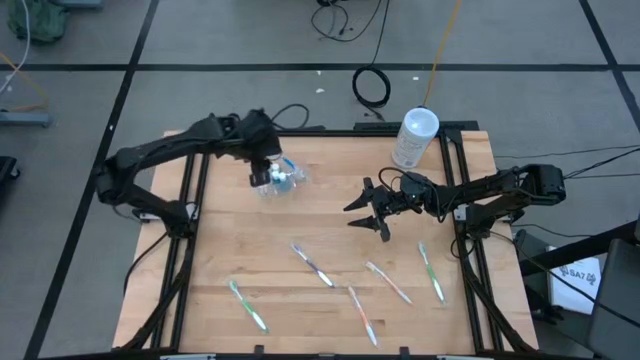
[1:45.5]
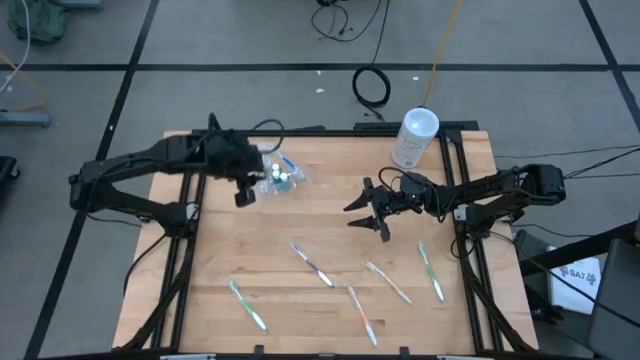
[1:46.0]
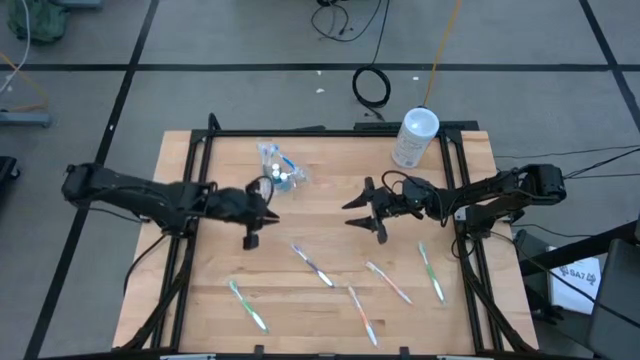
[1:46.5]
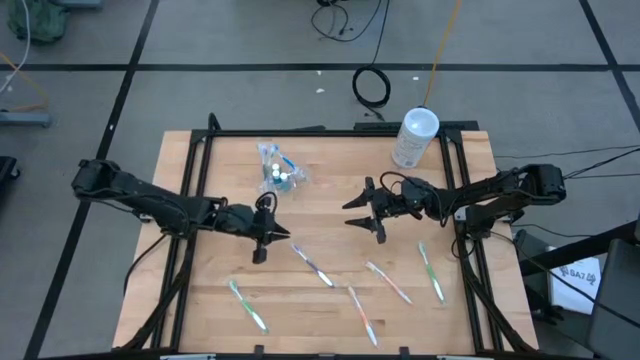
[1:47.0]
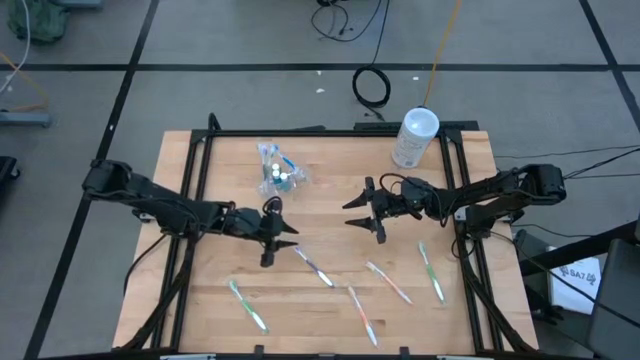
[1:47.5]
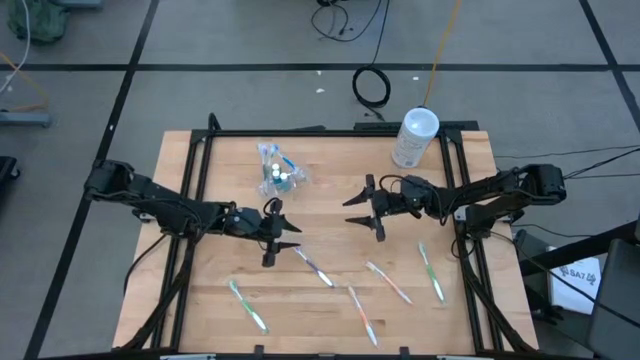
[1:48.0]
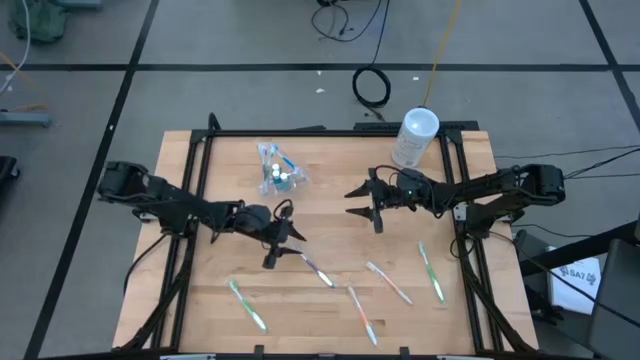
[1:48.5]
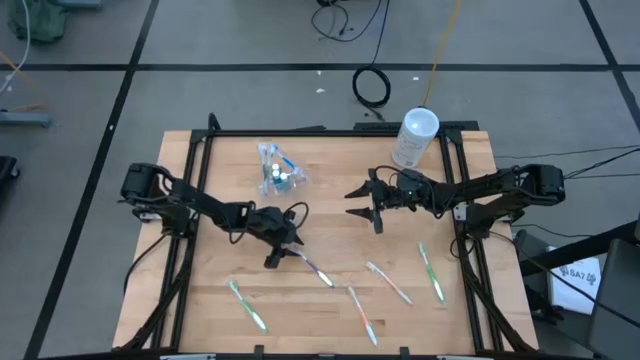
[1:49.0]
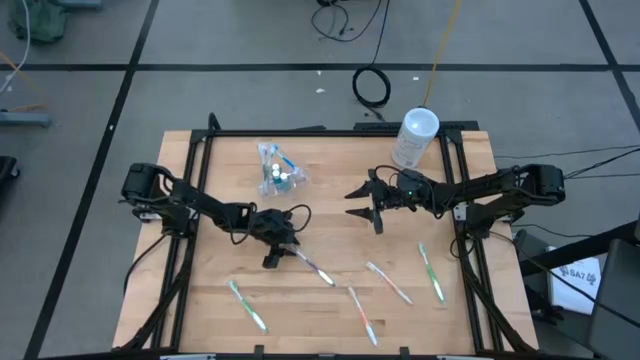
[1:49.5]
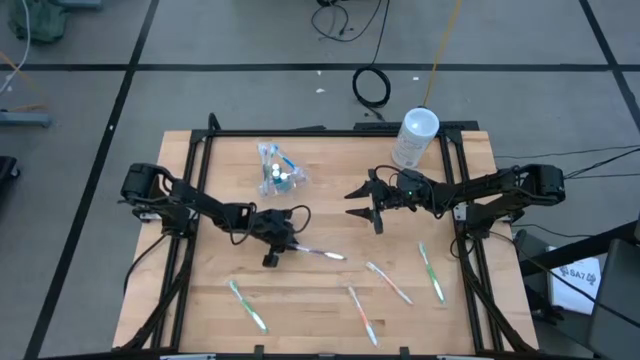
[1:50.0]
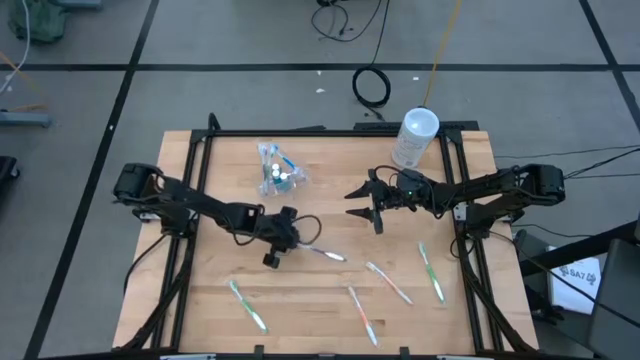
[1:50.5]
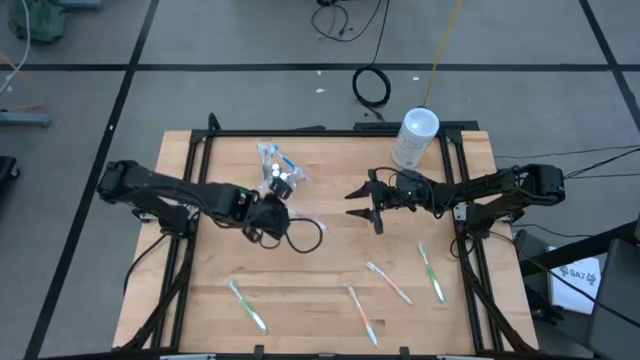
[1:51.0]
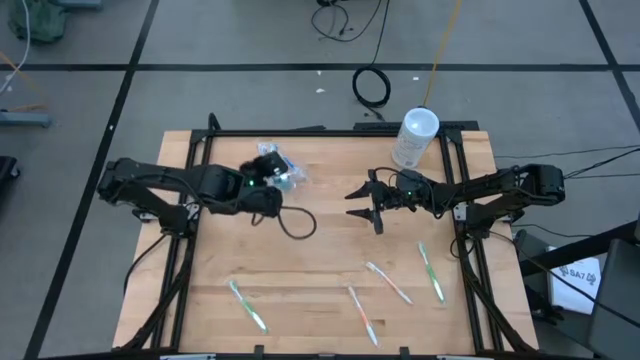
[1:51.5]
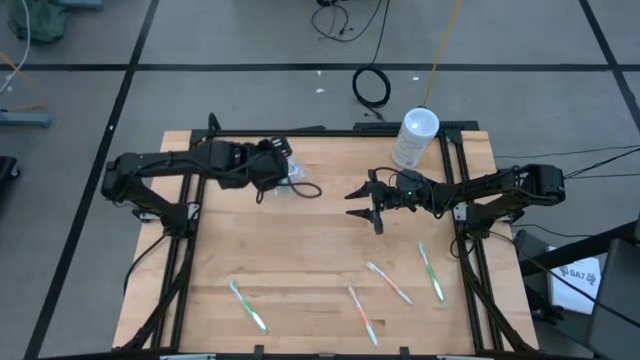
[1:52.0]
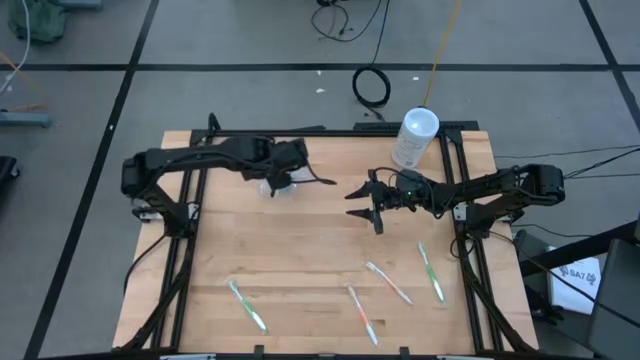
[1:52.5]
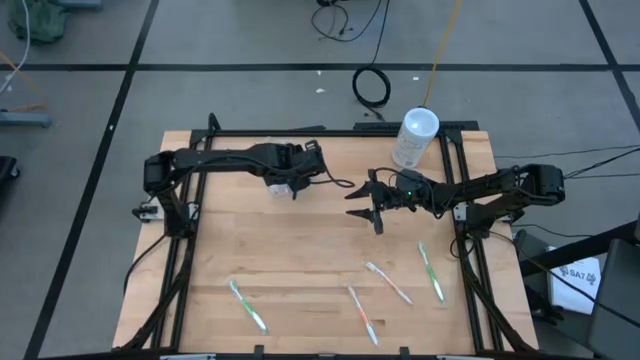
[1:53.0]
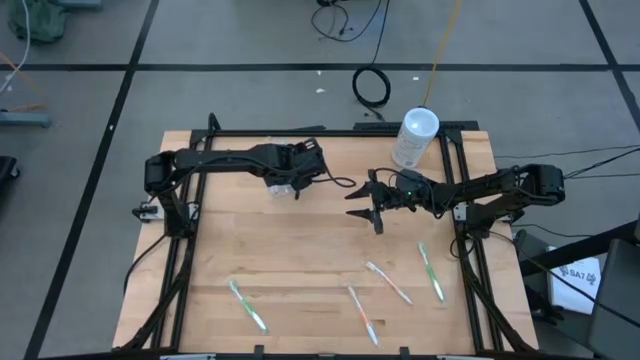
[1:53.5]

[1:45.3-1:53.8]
Task: Pick & Place toothbrushing station
Put the violet toothbrush into the transparent organizer

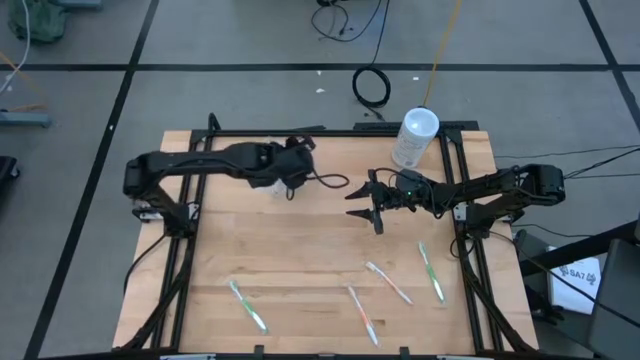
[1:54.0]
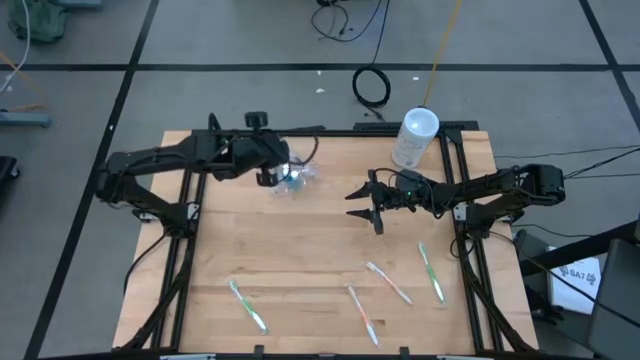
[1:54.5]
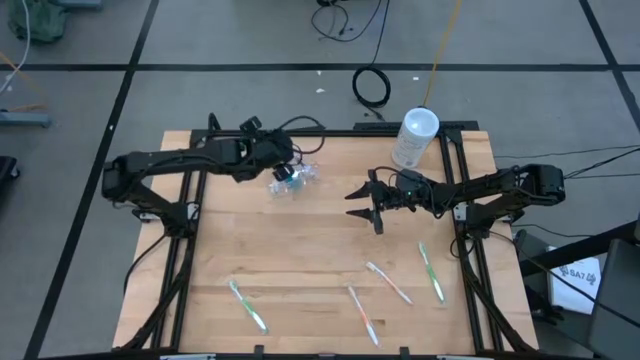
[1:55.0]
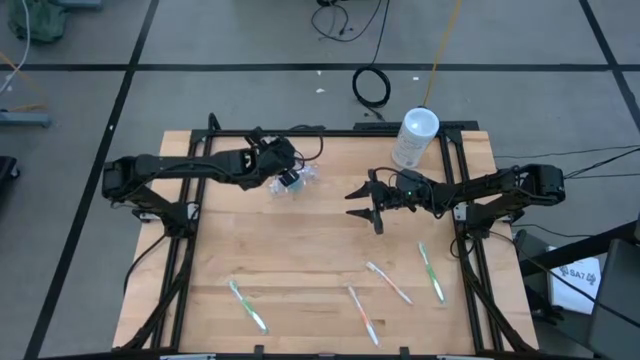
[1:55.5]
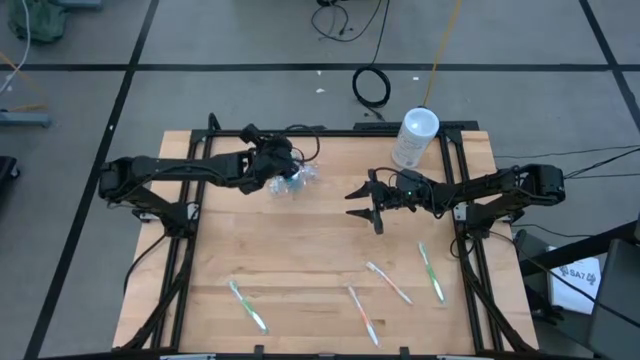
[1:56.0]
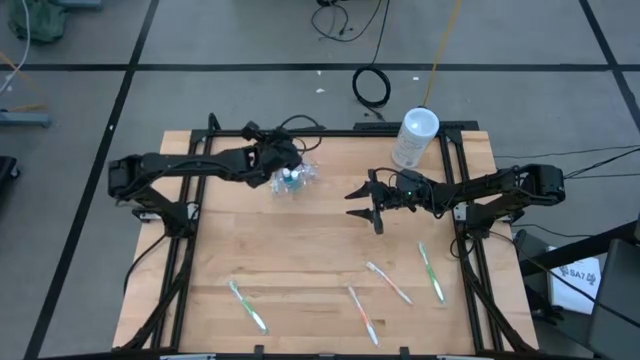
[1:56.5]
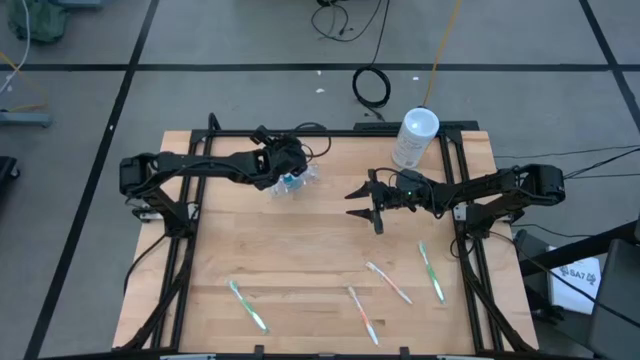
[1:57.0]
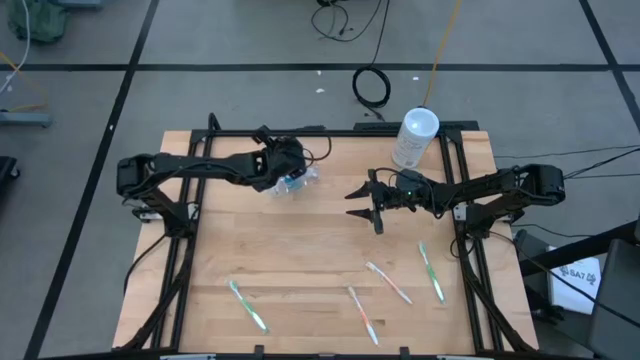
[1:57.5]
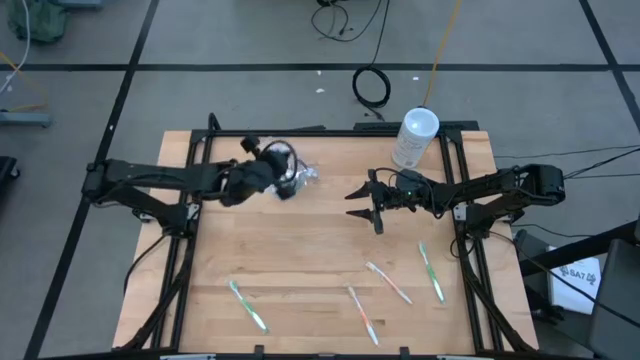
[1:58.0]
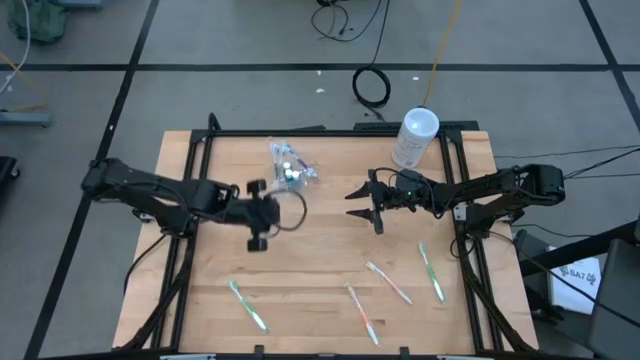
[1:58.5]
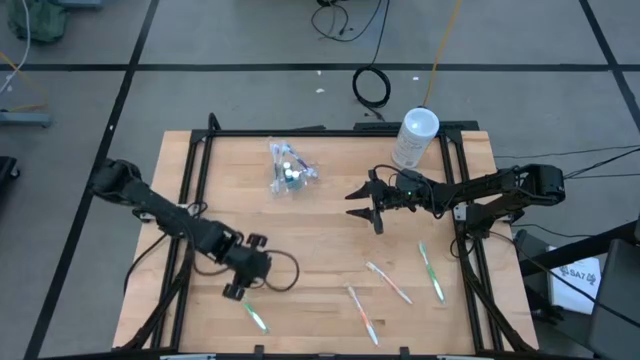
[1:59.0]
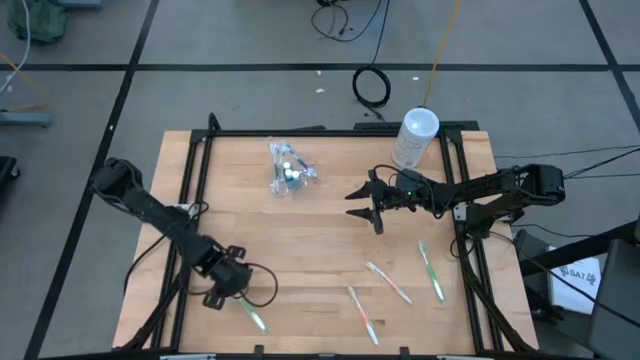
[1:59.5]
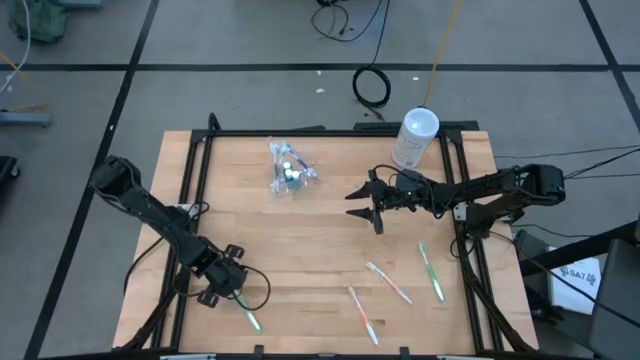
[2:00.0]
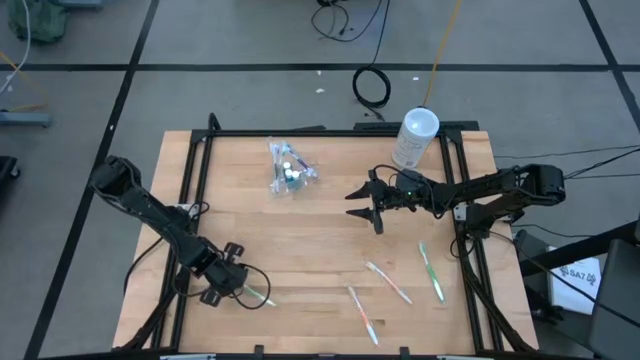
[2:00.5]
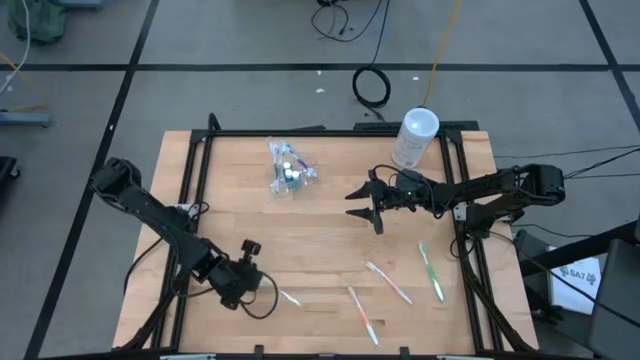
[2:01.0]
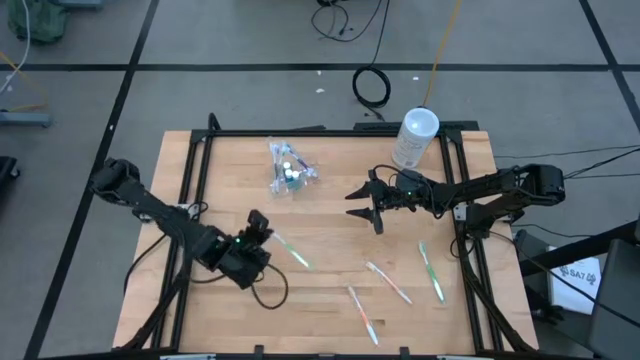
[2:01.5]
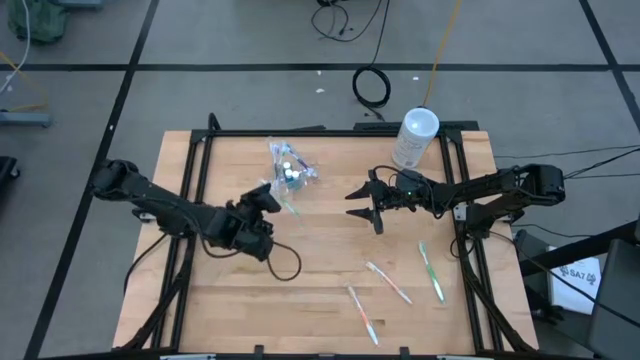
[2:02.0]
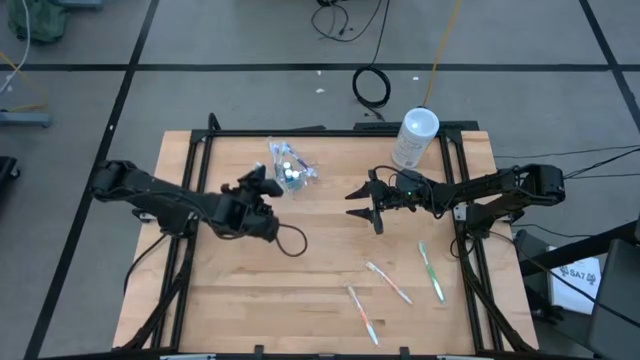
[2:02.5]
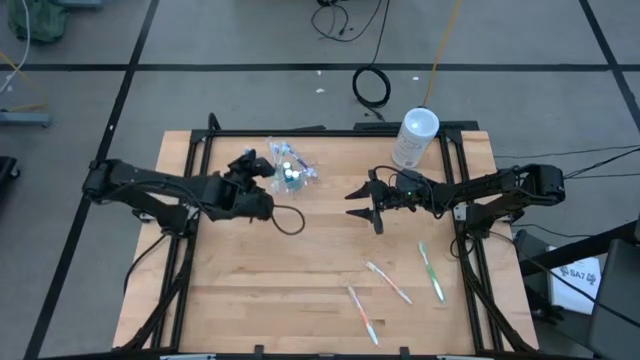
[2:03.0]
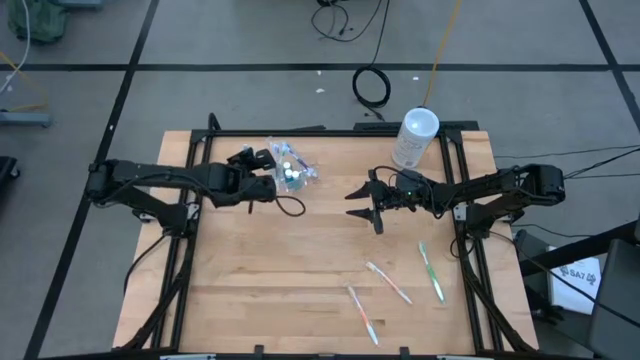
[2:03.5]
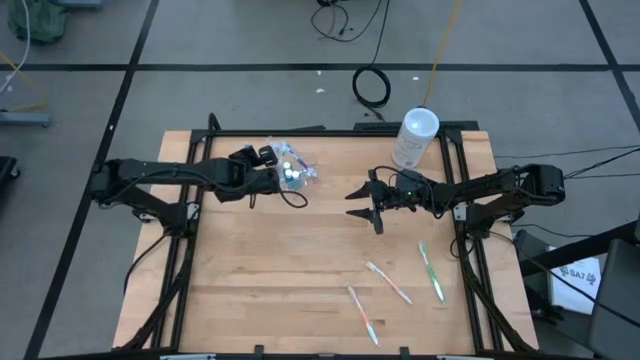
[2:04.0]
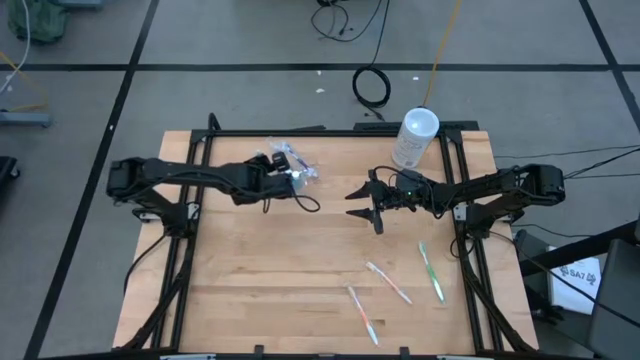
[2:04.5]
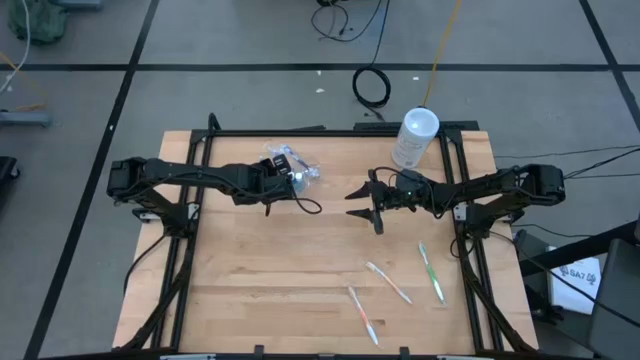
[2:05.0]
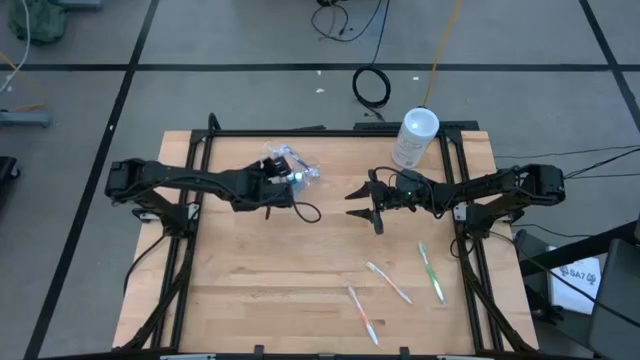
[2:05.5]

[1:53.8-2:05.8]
Put the green toothbrush into the transparent organizer

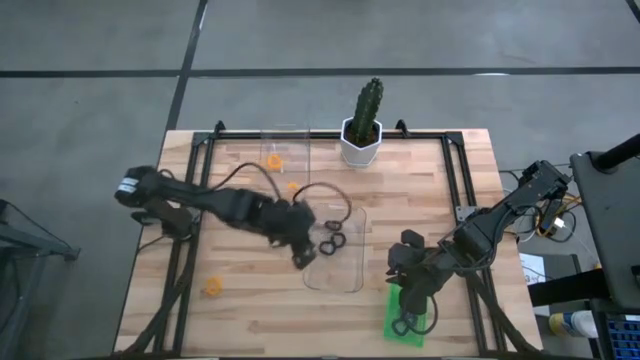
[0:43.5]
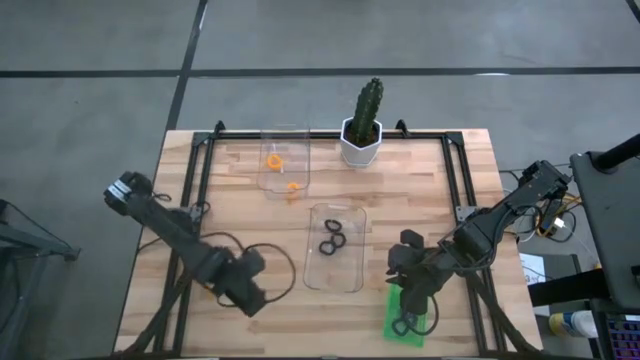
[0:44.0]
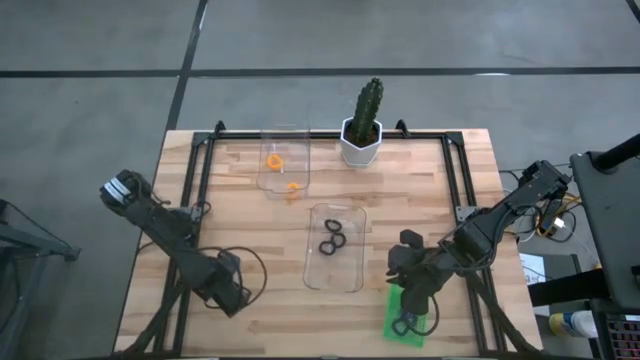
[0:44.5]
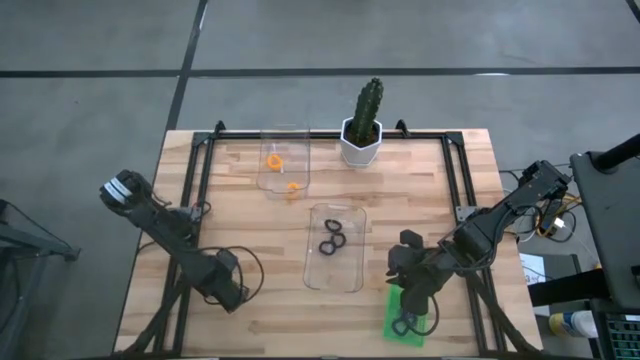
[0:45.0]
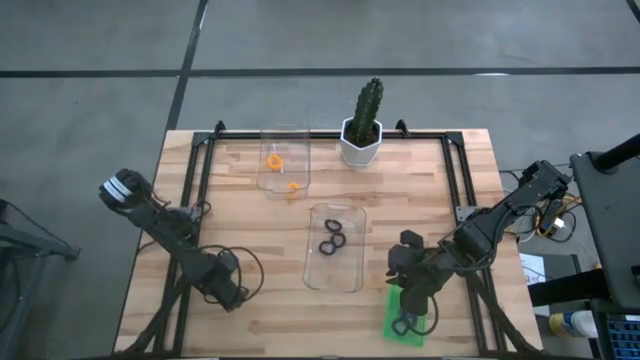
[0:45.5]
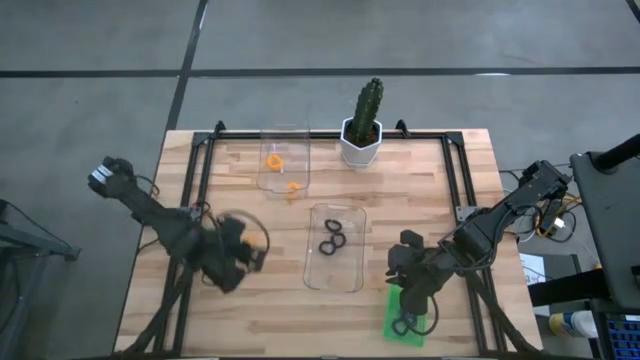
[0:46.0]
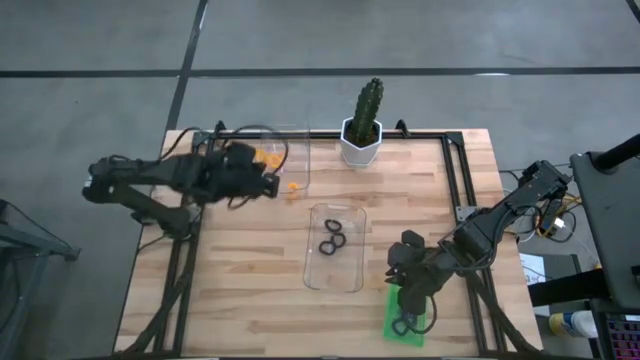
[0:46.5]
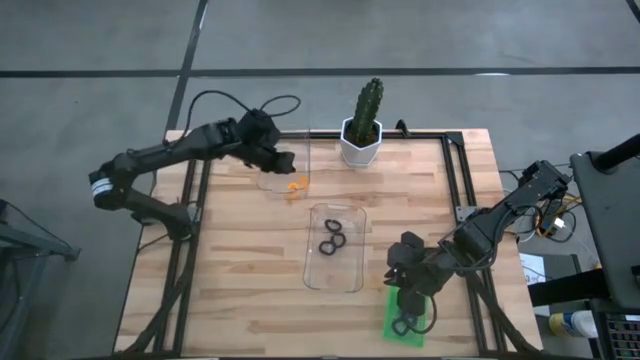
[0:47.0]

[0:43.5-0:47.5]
Task: Sort spring keychains
Put the yellow spring keychain into the top transparent bin
